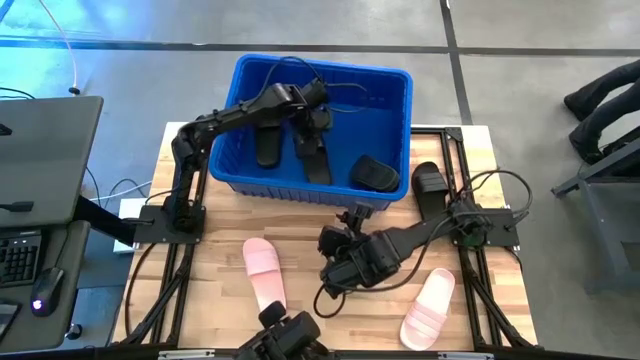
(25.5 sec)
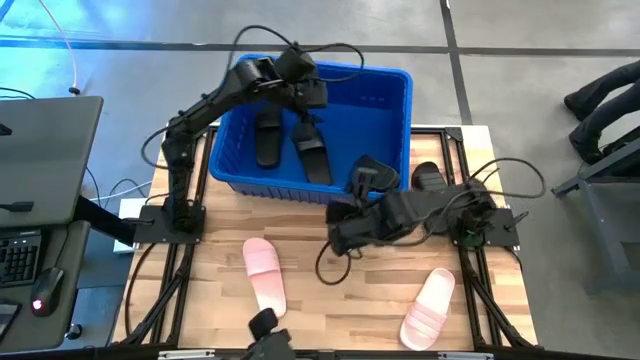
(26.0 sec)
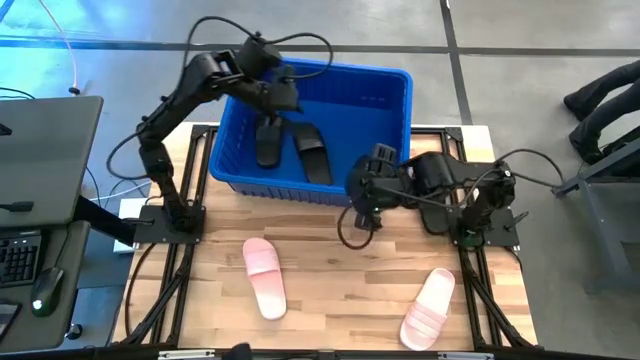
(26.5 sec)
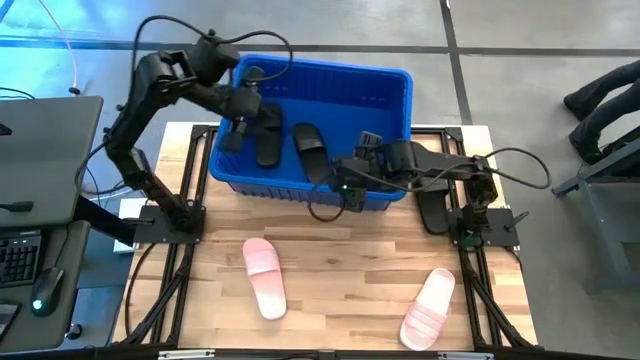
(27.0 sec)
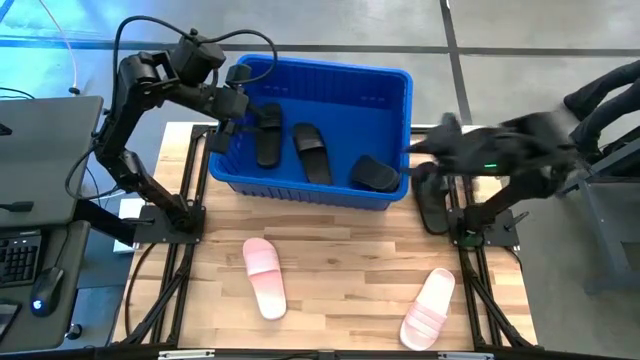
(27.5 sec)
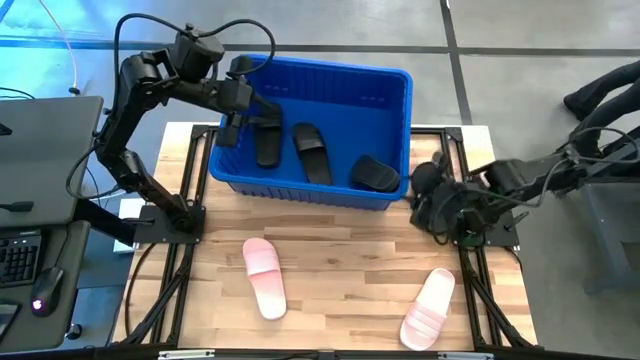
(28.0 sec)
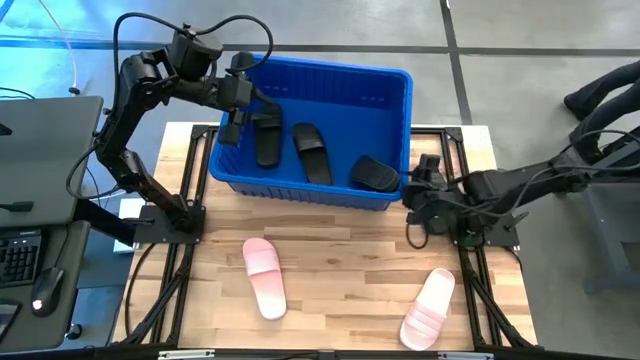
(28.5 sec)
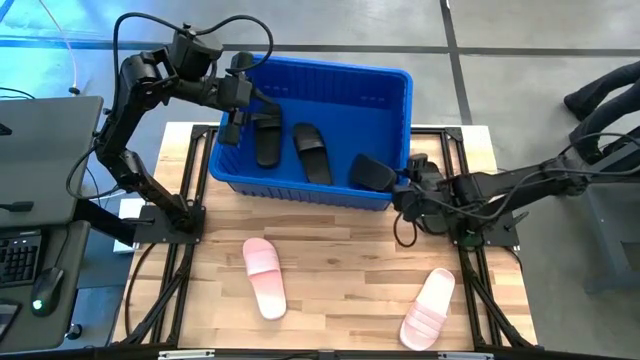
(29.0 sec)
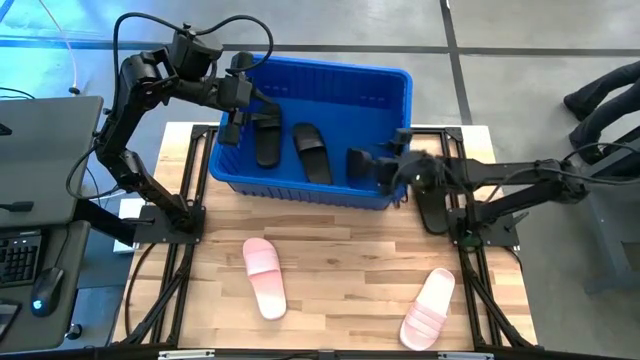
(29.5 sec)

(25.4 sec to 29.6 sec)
Task: Pick and place slides into bin
Adjust the black slide in the blue bin

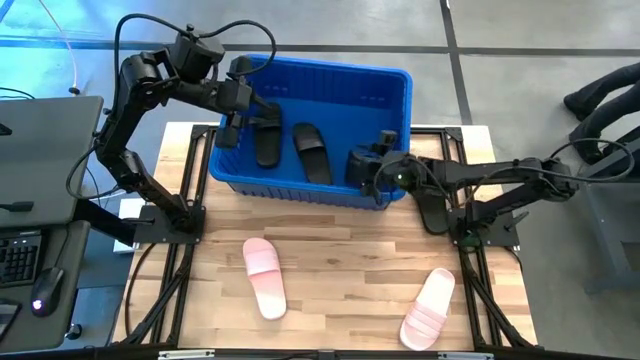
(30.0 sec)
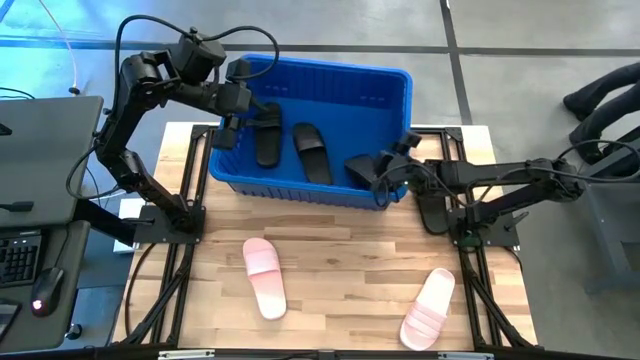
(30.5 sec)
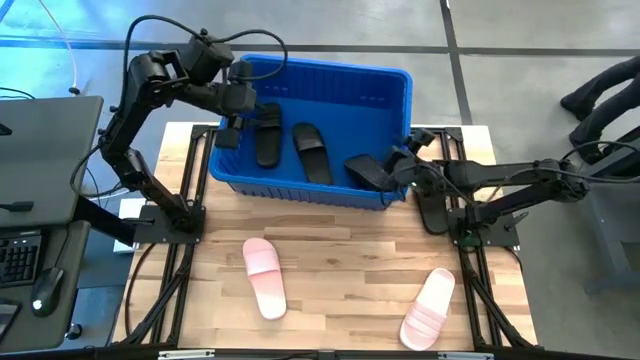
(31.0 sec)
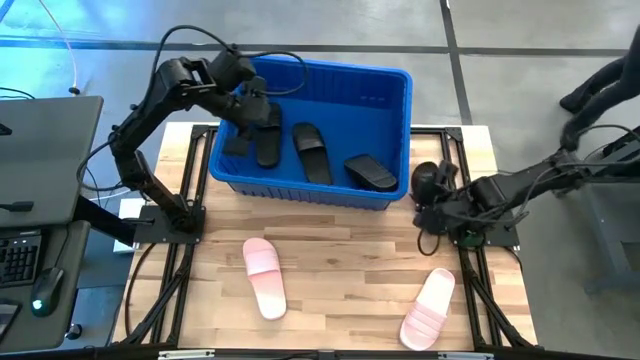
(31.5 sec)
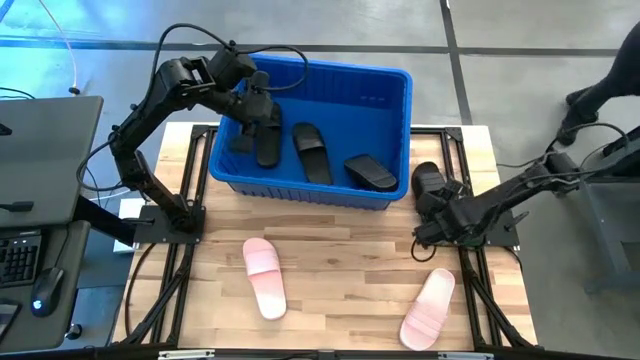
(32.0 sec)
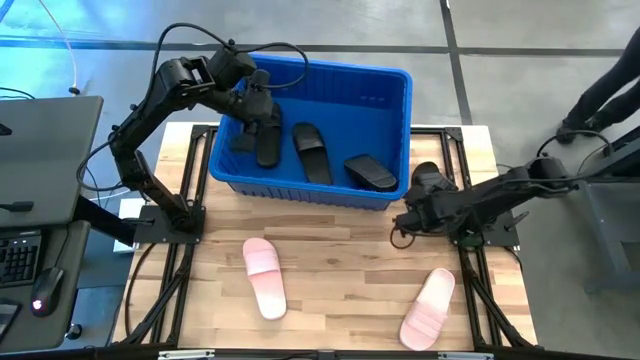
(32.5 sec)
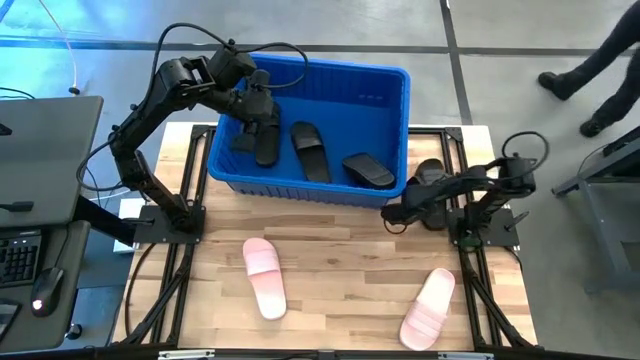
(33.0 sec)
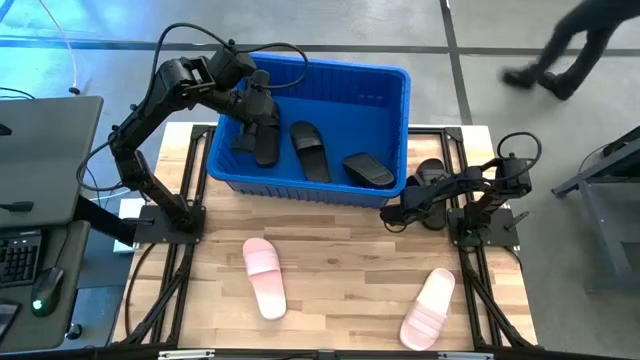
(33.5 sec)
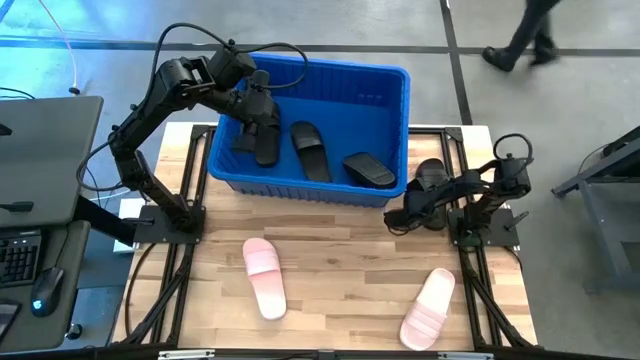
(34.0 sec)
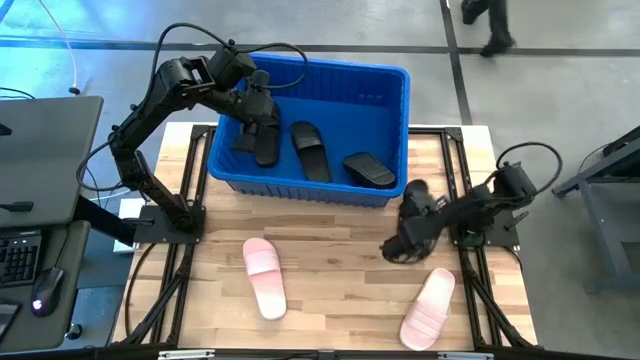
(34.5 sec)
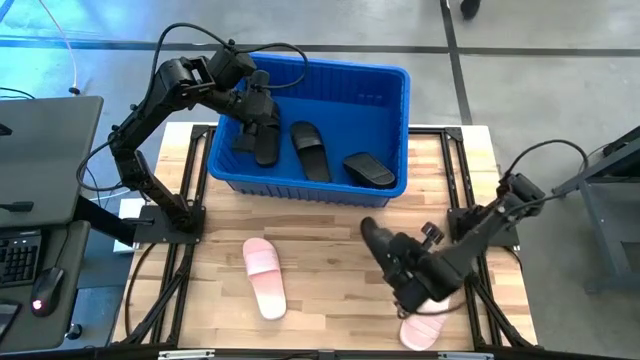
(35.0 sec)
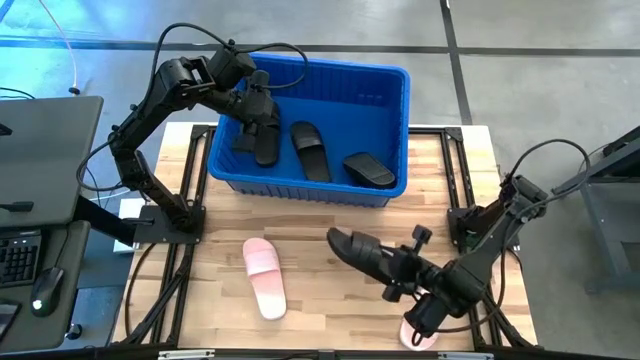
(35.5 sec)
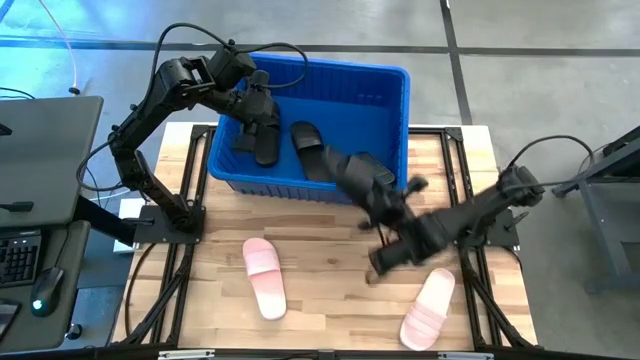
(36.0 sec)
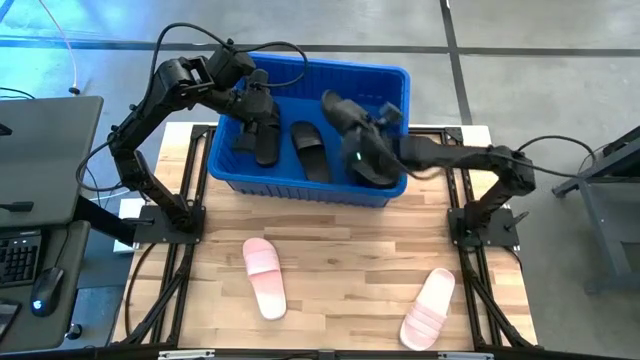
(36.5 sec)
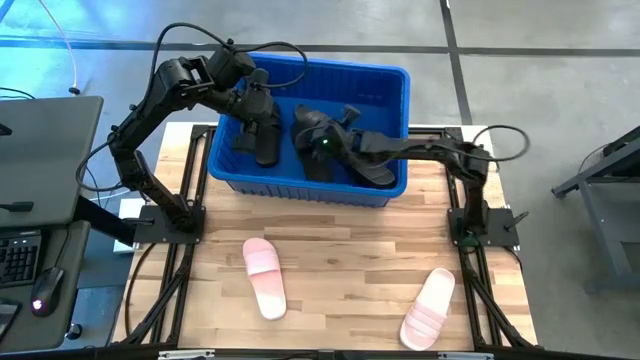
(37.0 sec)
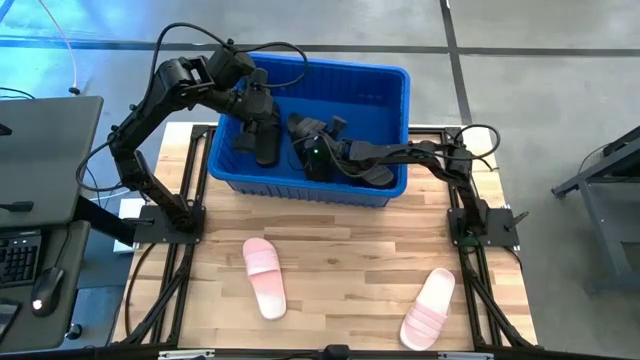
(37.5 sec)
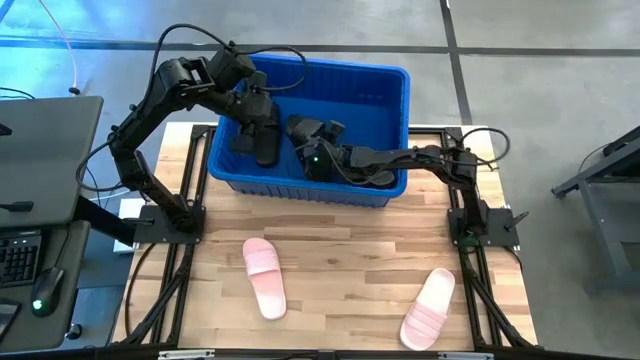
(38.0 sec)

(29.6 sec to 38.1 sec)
Put the black slide into the blue bin

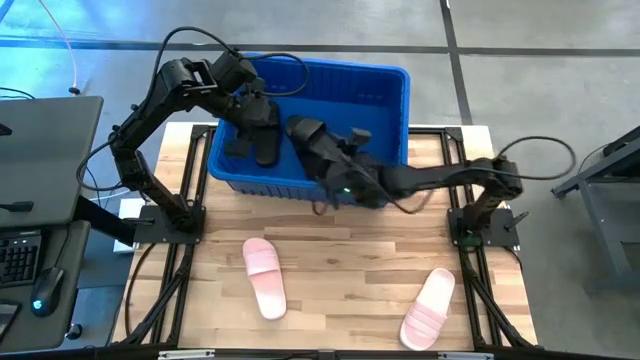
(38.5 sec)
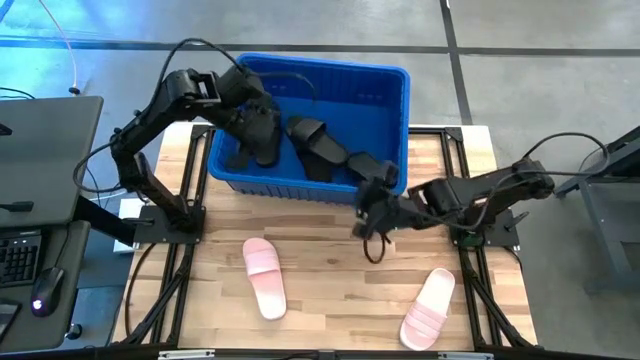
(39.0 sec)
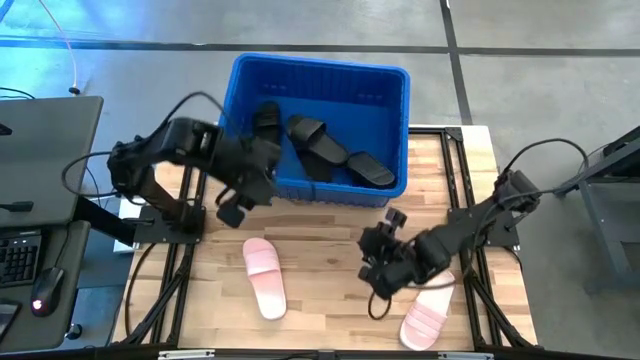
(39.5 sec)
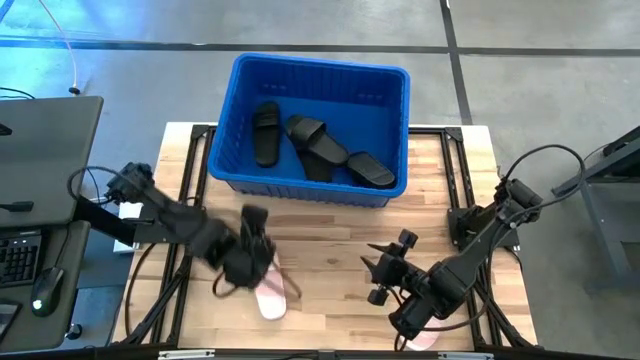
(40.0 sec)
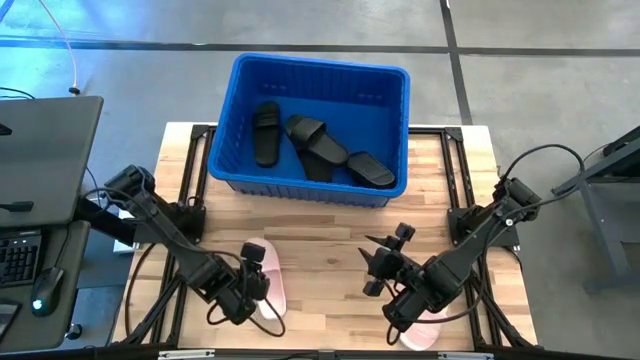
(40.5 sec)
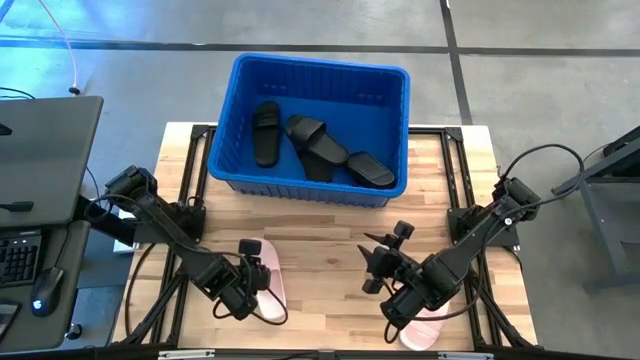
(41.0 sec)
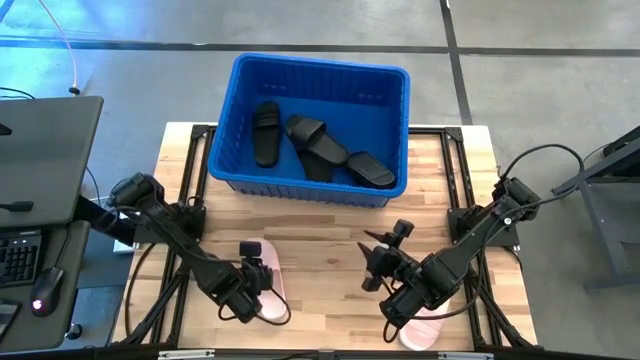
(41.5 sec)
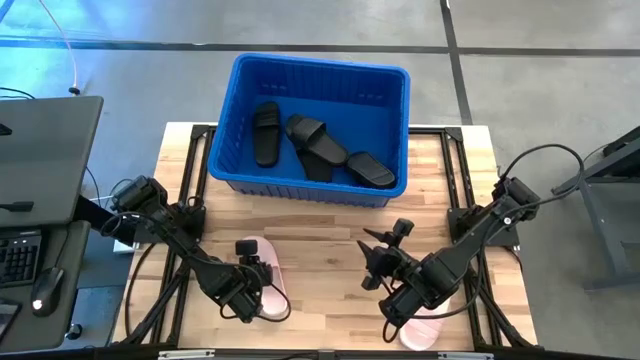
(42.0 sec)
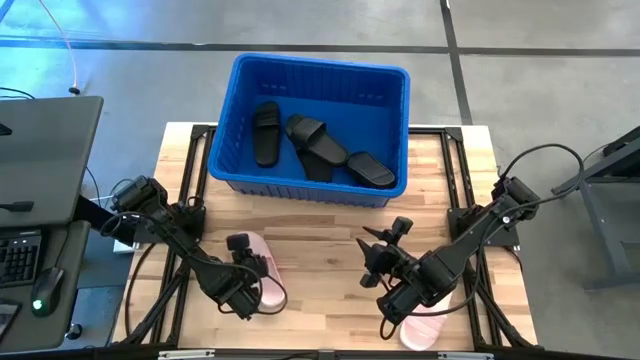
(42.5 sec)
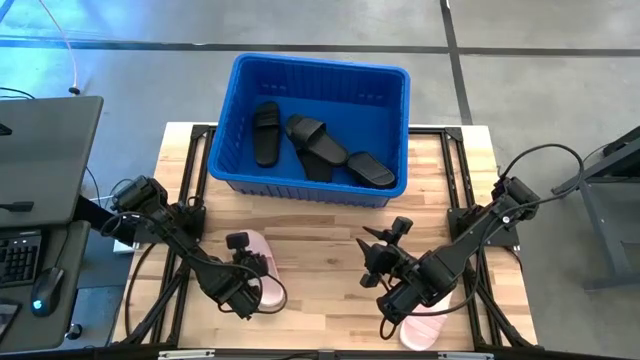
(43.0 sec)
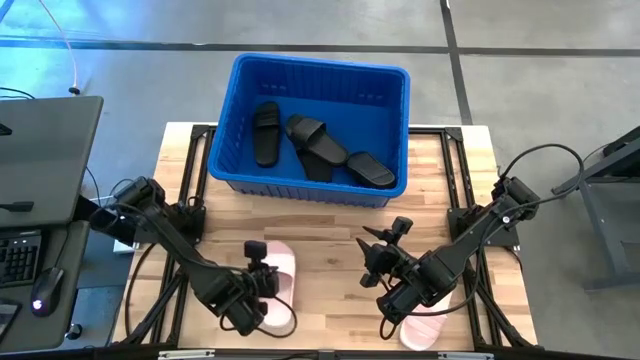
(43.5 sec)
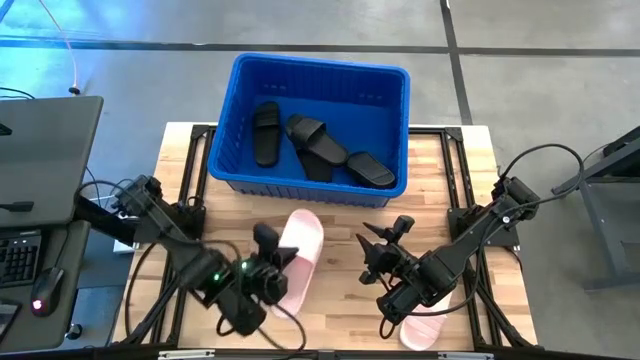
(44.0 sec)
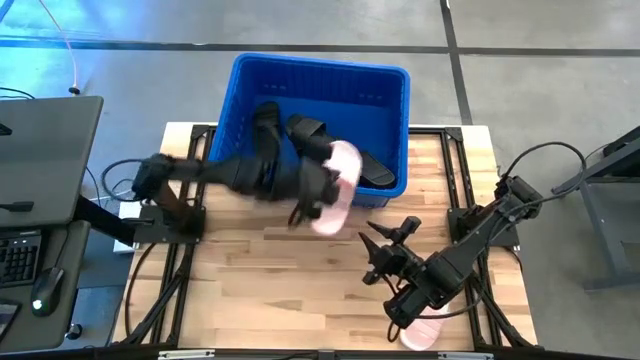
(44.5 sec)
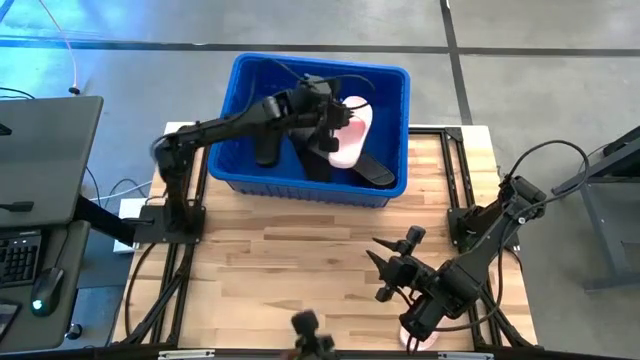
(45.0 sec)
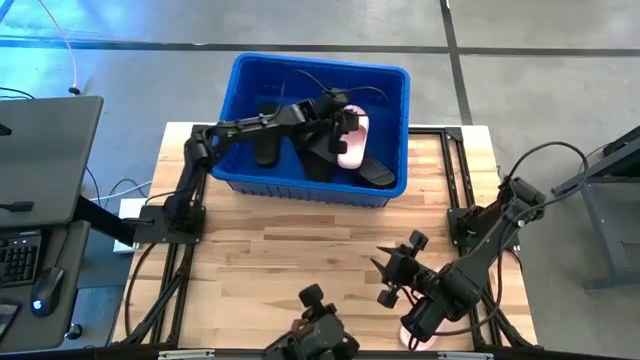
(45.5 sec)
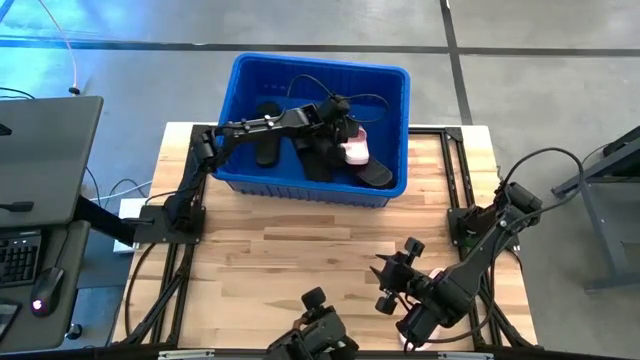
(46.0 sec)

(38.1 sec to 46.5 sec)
Put the white slide into the blue bin

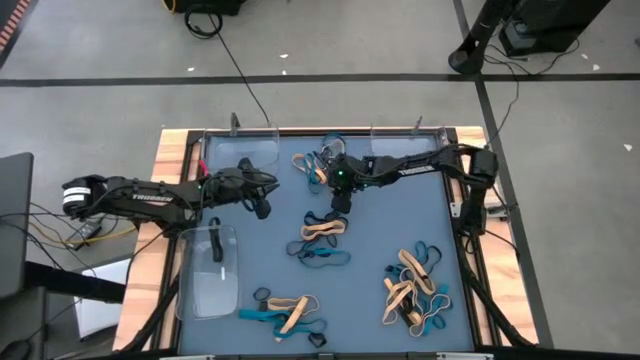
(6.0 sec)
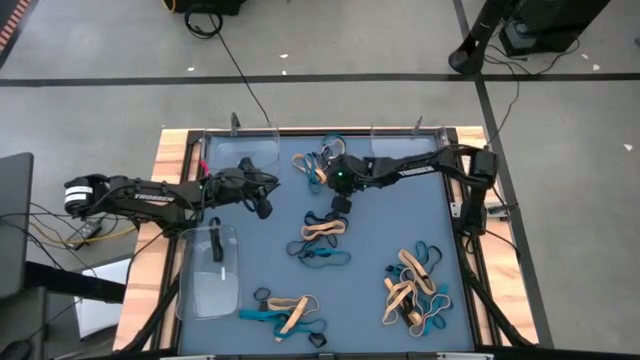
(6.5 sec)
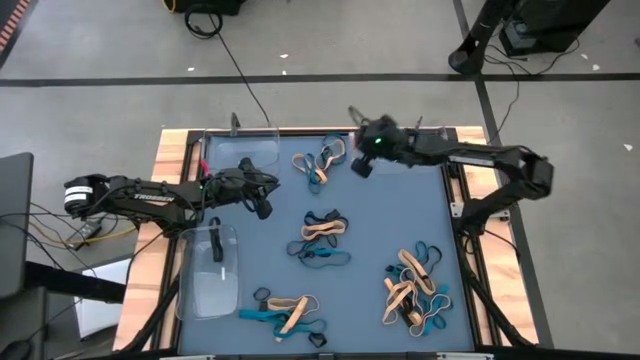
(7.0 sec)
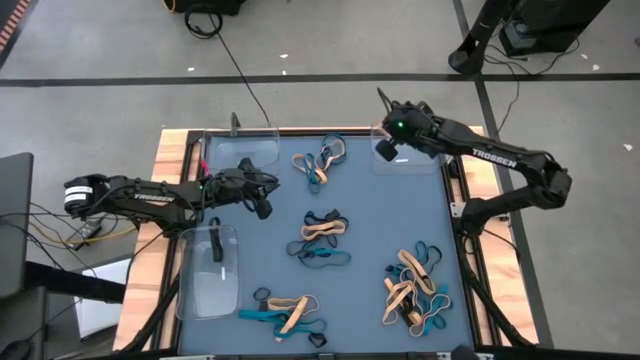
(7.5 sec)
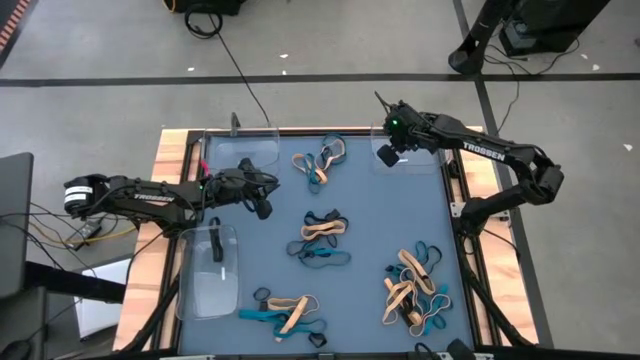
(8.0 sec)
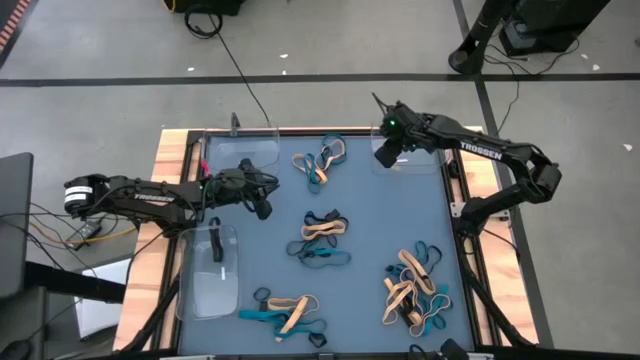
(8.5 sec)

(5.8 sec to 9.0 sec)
Task: Sort rubber bands into baskets
Put the yellow rubber band into the top right transparent bin
